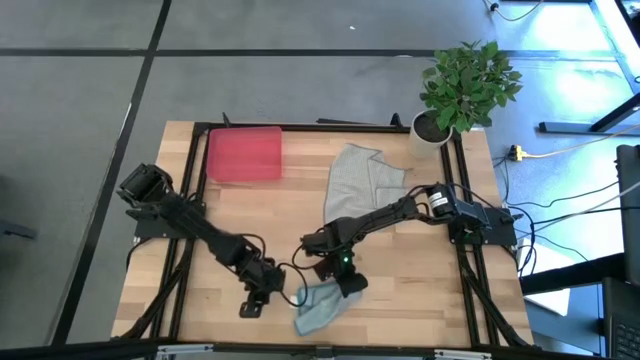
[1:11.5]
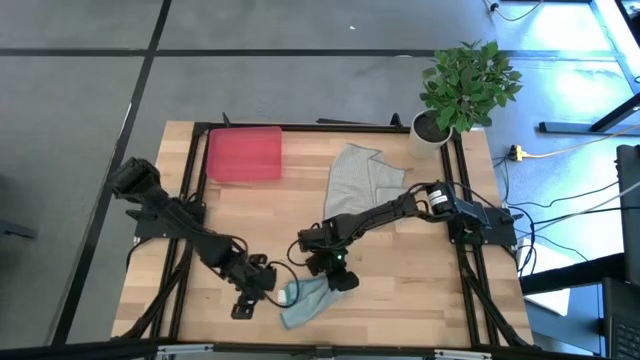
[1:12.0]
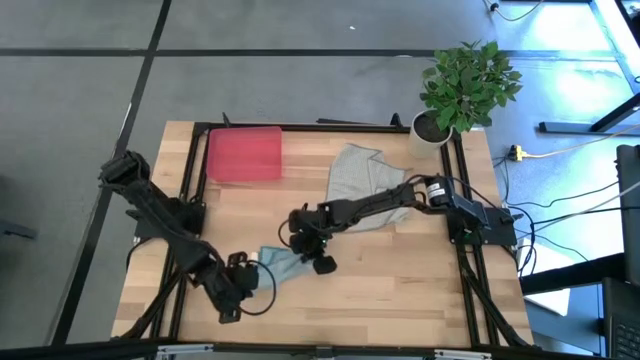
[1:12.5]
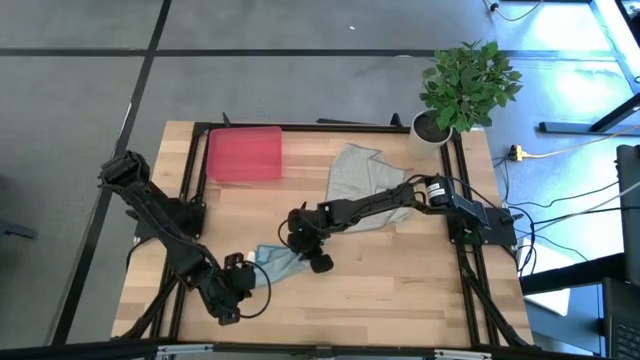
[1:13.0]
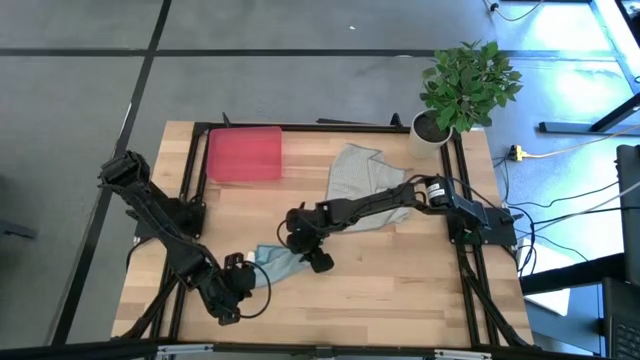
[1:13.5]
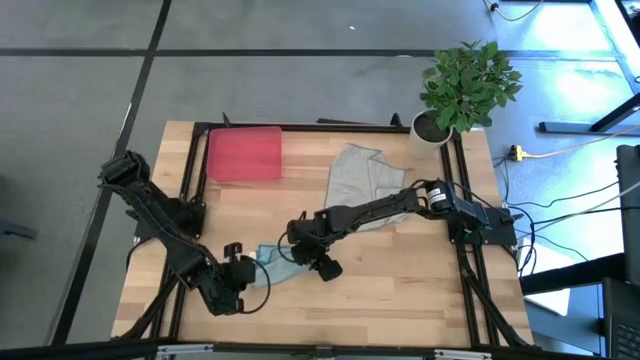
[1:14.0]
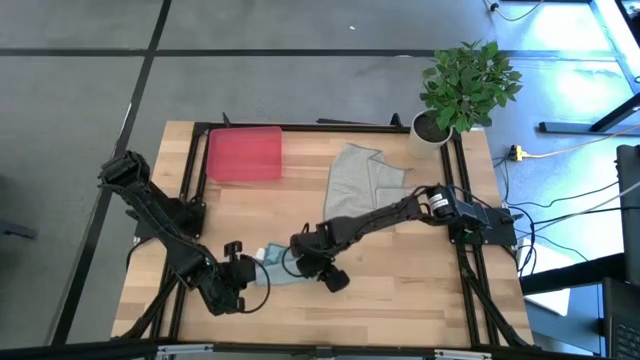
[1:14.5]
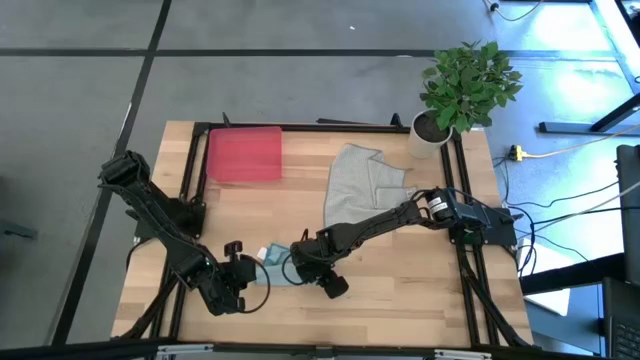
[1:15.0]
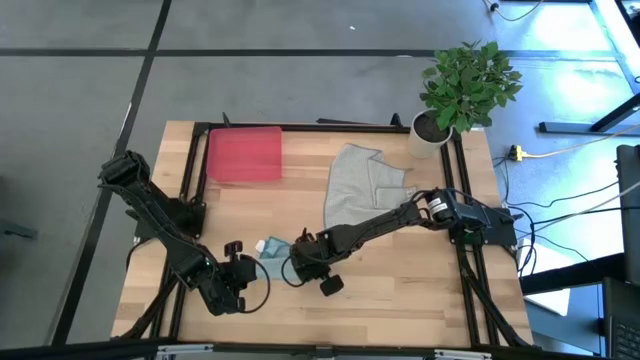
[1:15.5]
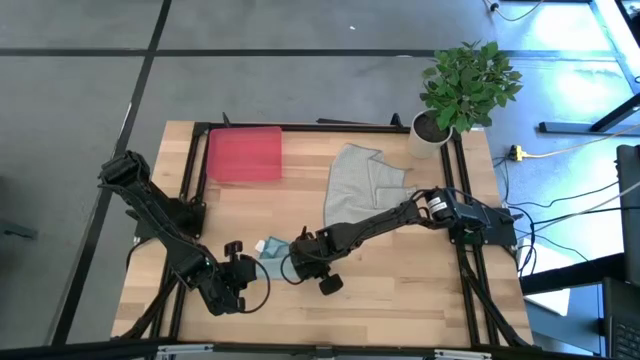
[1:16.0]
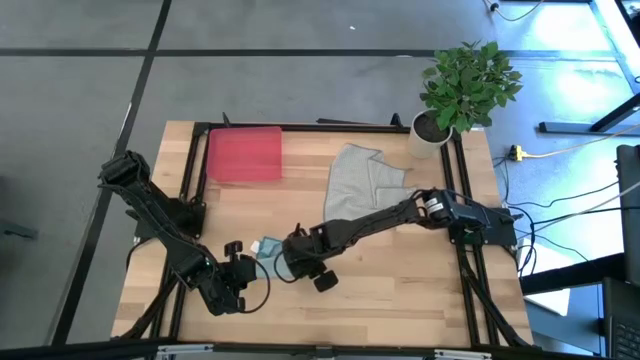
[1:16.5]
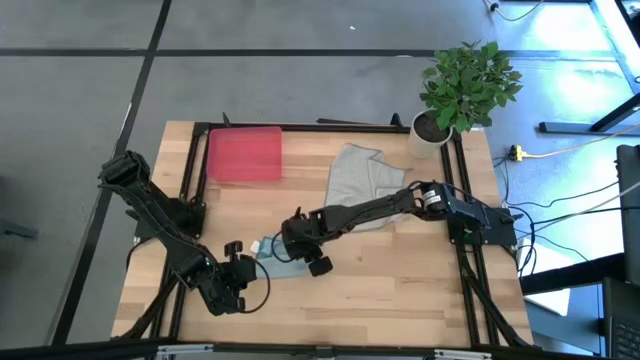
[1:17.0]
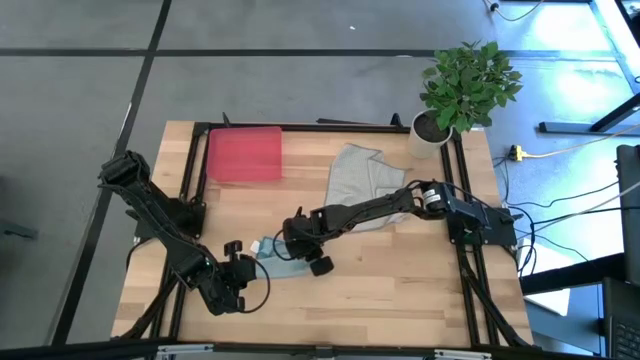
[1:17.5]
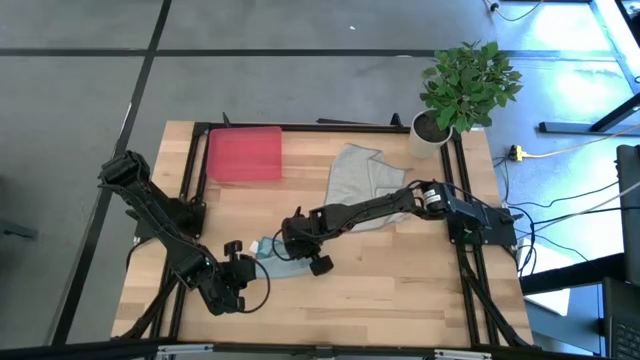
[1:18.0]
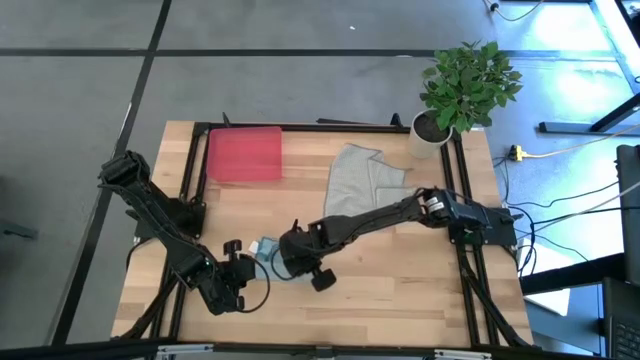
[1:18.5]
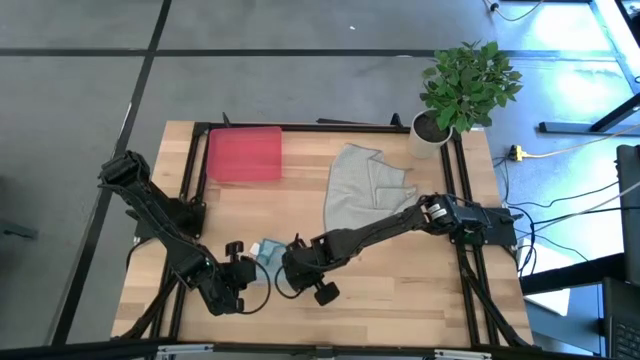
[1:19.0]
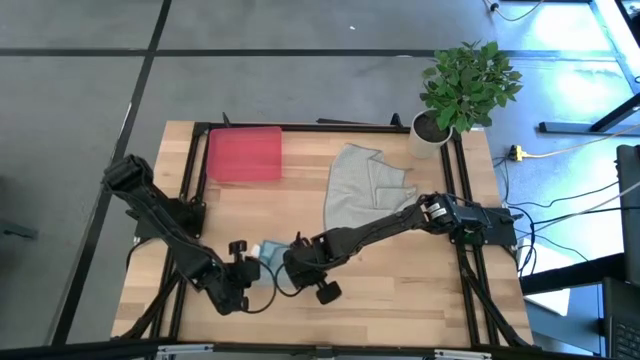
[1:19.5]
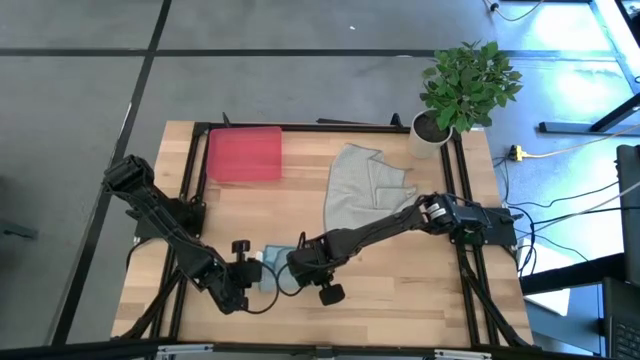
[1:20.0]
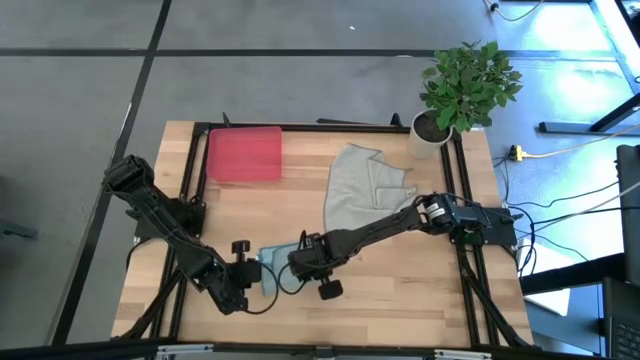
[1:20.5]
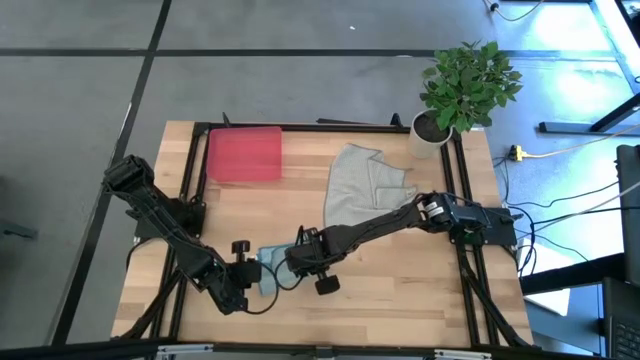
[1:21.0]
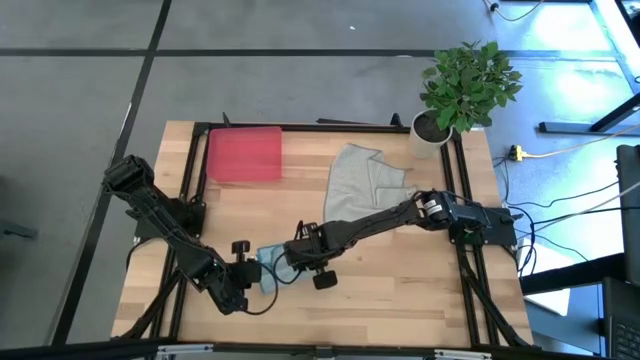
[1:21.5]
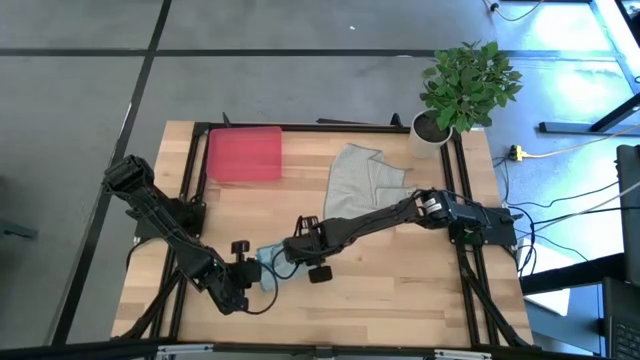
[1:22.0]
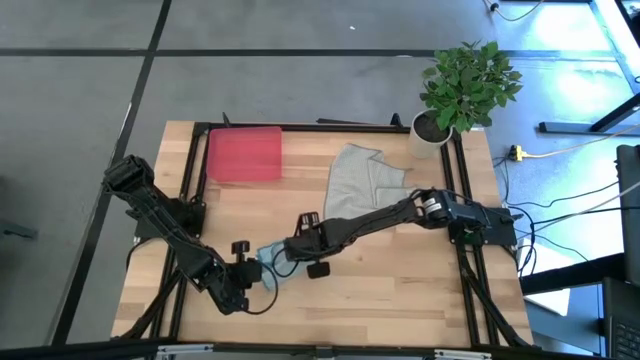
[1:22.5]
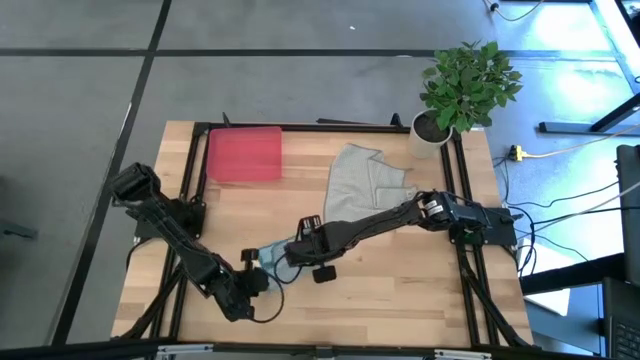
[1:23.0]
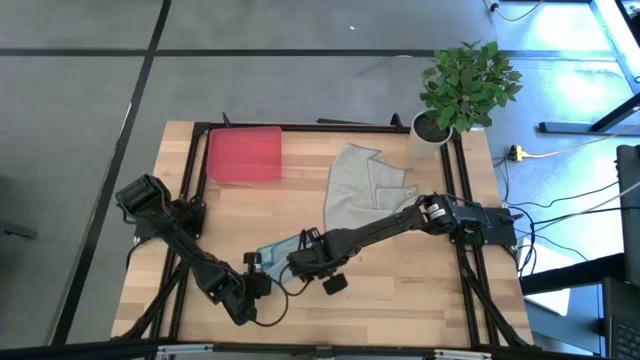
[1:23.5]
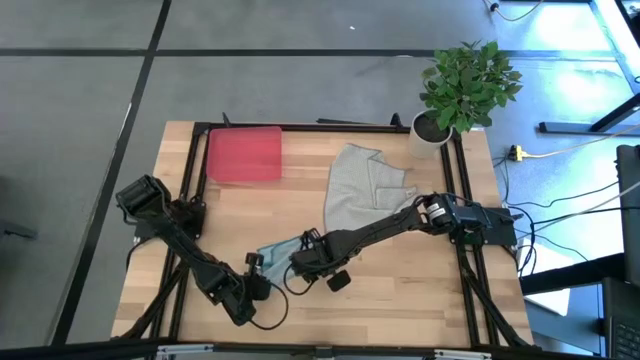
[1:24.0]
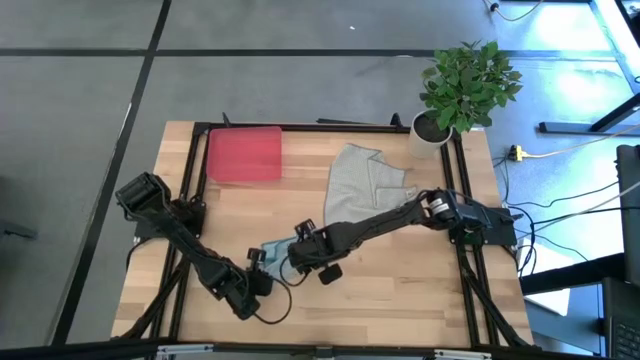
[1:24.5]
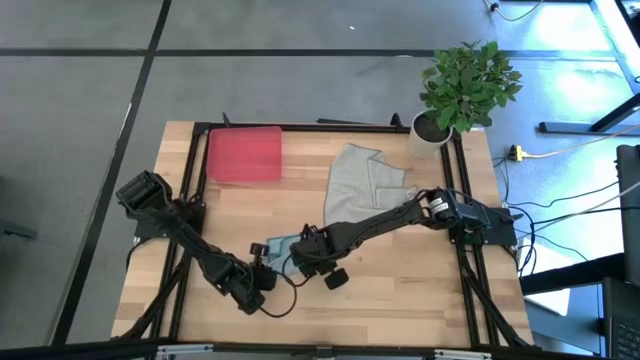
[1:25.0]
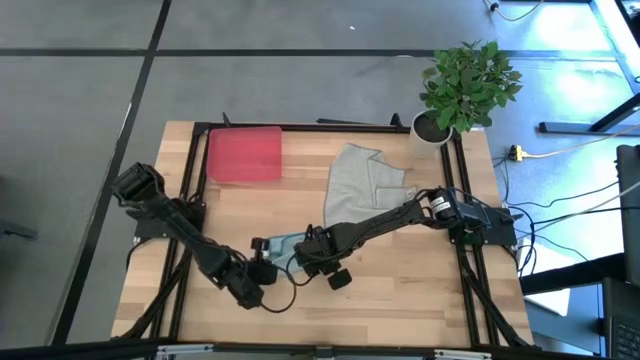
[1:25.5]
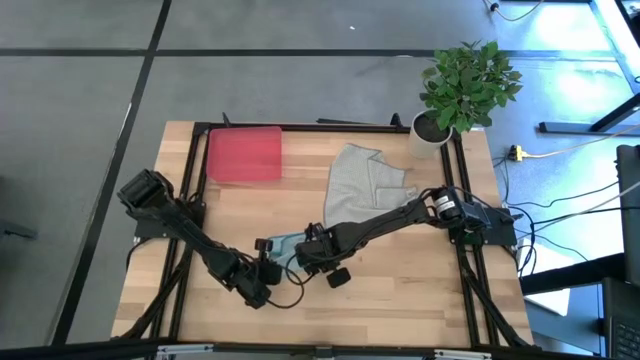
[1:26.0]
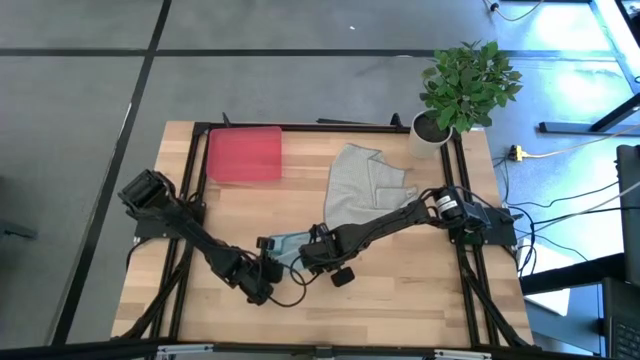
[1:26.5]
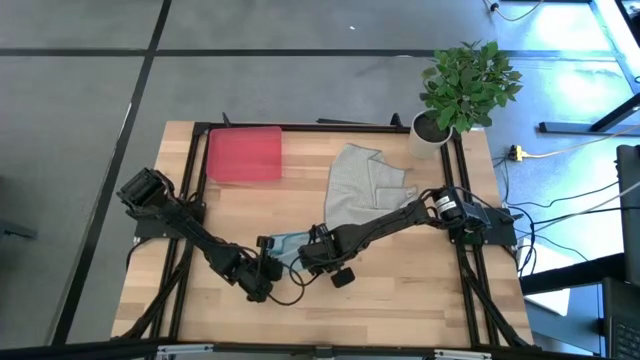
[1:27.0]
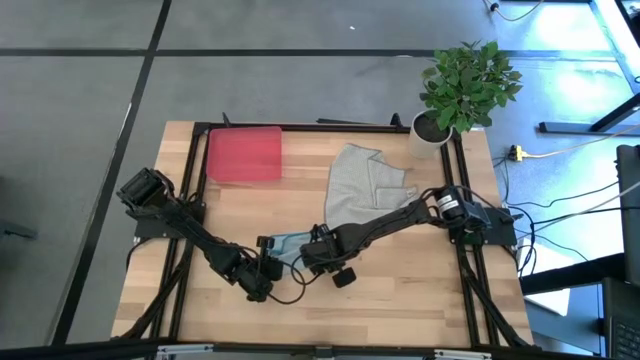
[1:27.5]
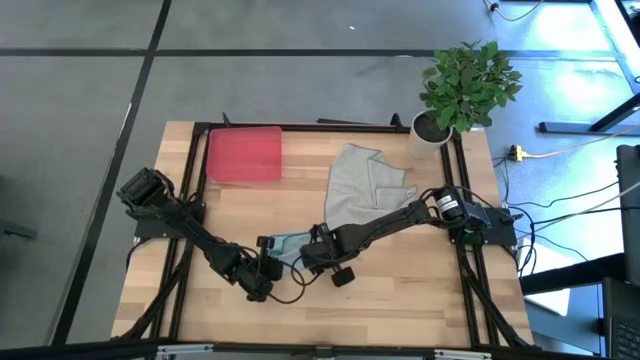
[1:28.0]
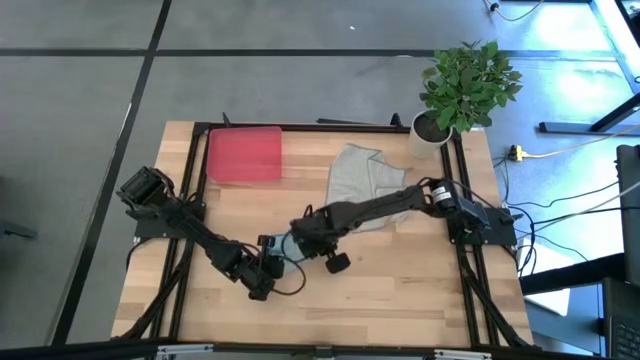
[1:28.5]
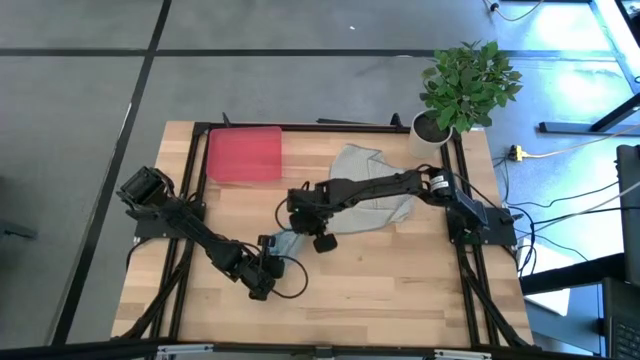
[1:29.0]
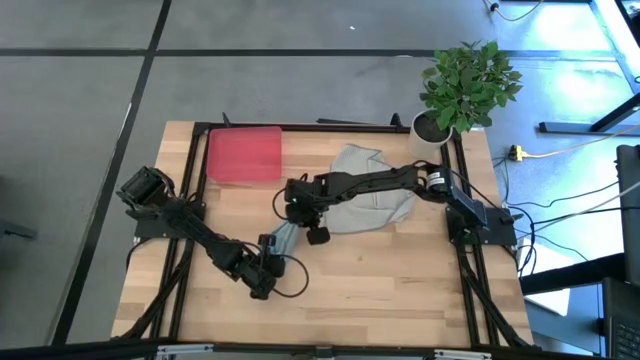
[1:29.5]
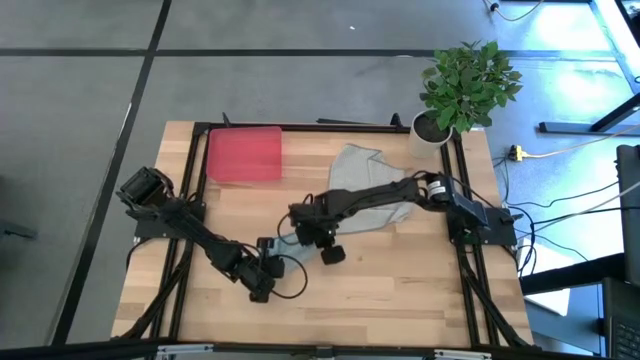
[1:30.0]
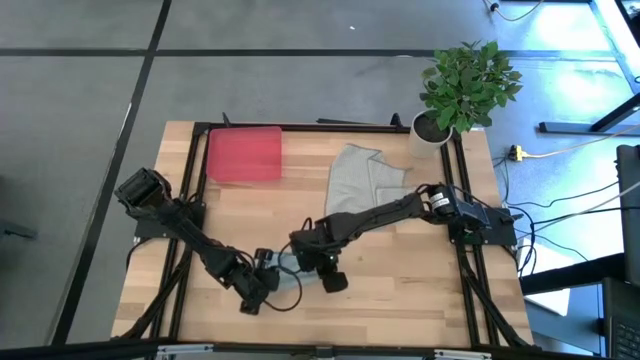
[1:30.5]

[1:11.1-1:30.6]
Task: Roll microfiber towels into tight, uniform cylinder then place into a basket
Roll the blue towel
